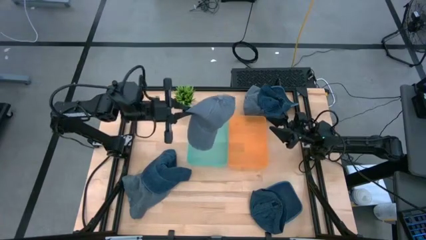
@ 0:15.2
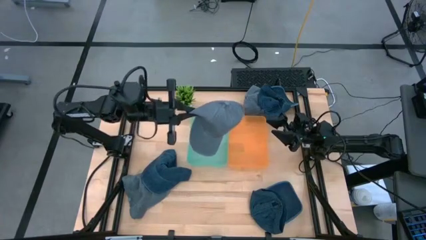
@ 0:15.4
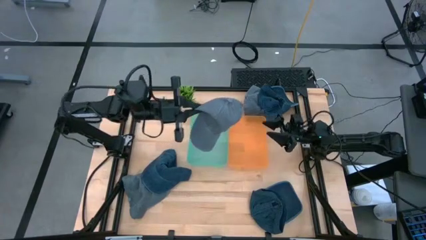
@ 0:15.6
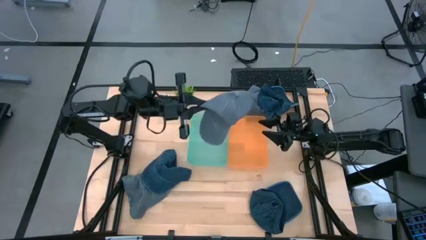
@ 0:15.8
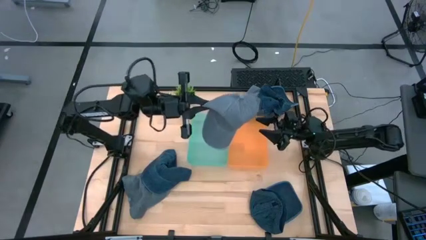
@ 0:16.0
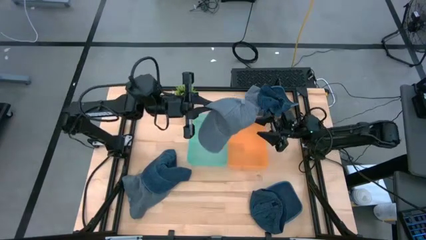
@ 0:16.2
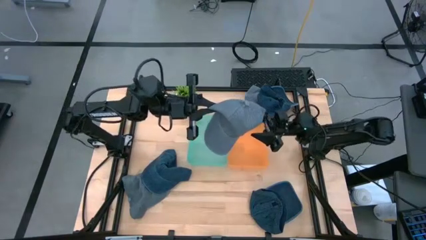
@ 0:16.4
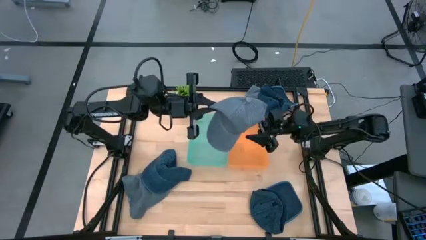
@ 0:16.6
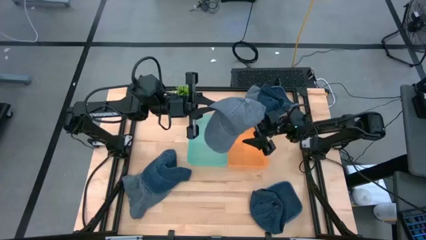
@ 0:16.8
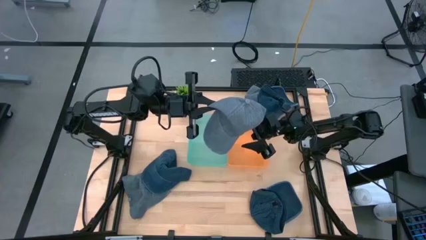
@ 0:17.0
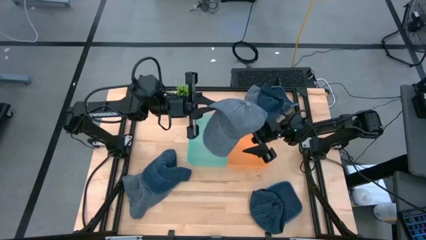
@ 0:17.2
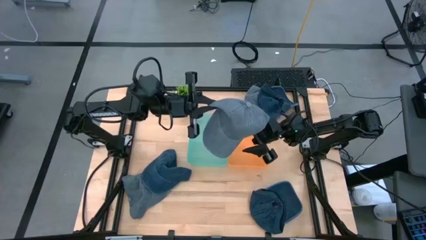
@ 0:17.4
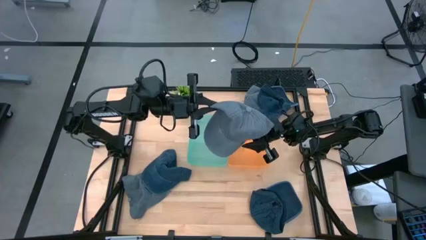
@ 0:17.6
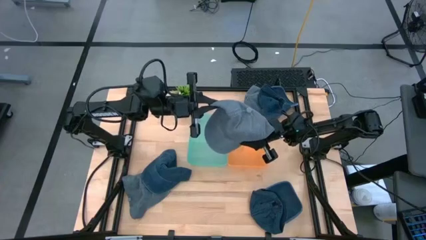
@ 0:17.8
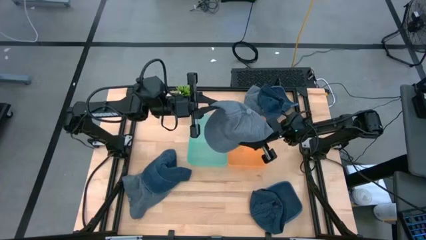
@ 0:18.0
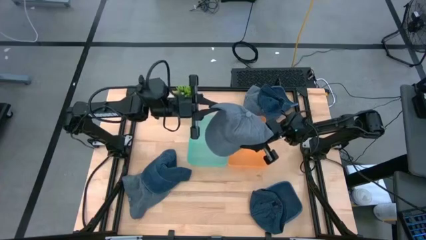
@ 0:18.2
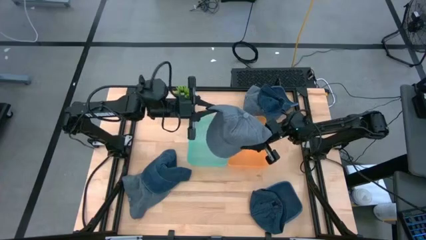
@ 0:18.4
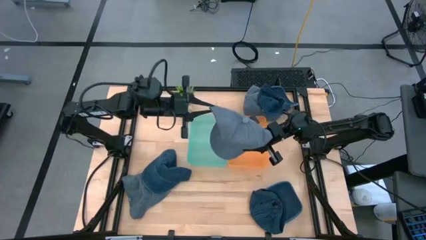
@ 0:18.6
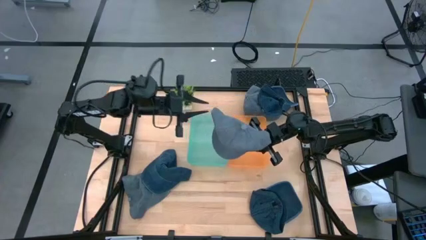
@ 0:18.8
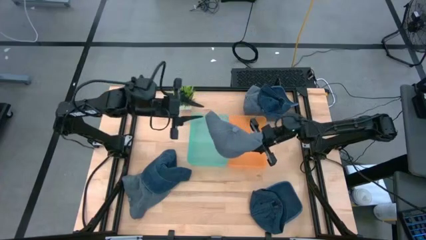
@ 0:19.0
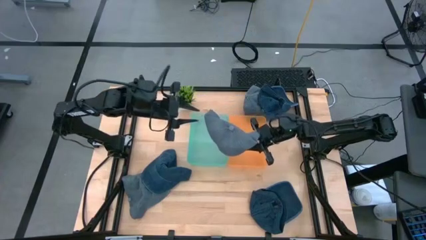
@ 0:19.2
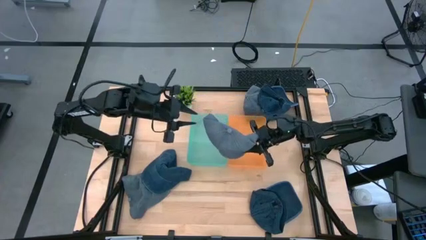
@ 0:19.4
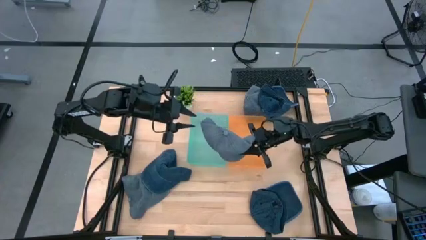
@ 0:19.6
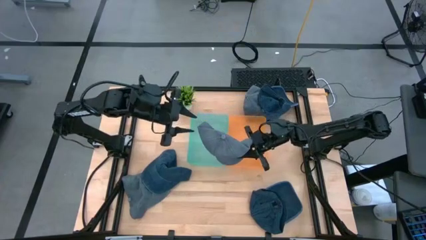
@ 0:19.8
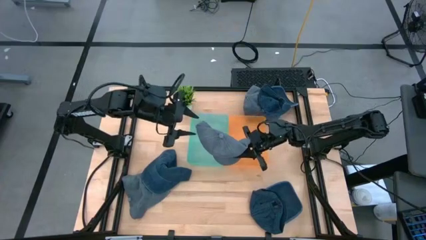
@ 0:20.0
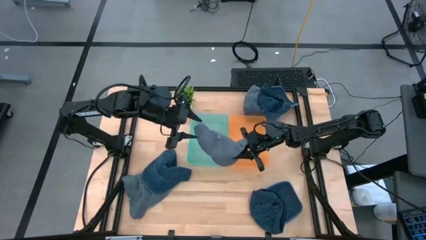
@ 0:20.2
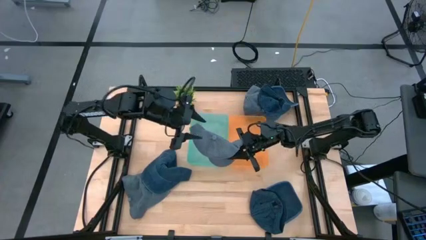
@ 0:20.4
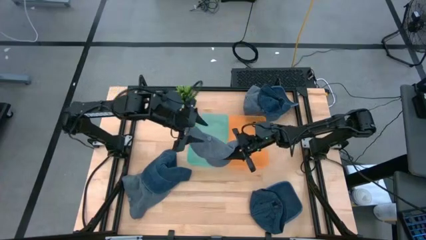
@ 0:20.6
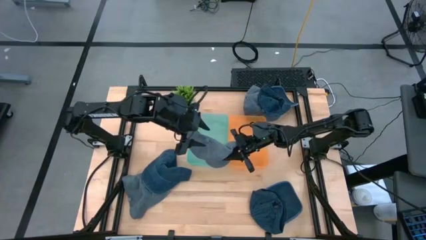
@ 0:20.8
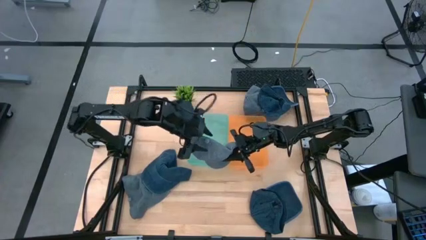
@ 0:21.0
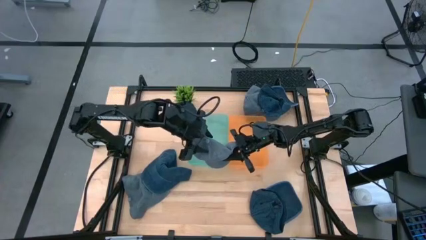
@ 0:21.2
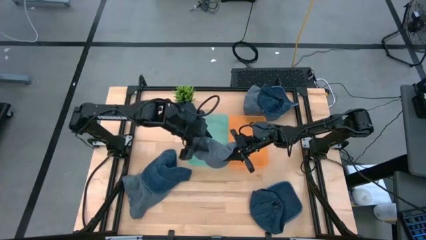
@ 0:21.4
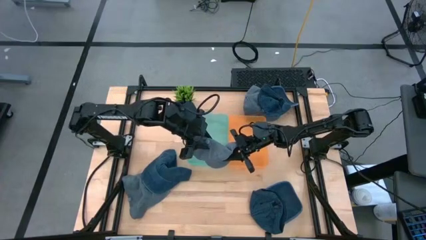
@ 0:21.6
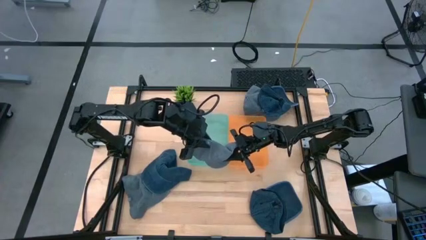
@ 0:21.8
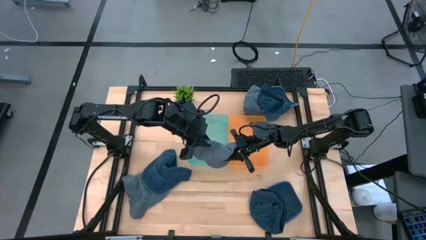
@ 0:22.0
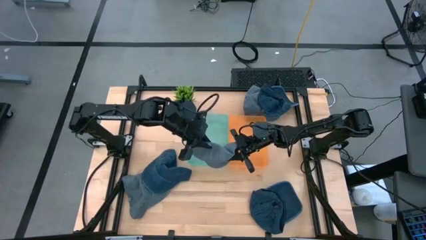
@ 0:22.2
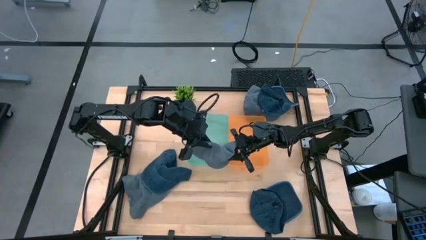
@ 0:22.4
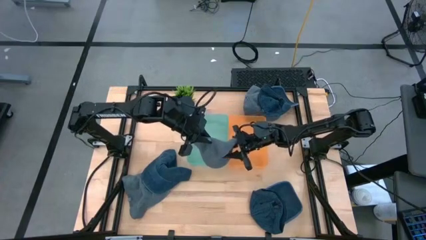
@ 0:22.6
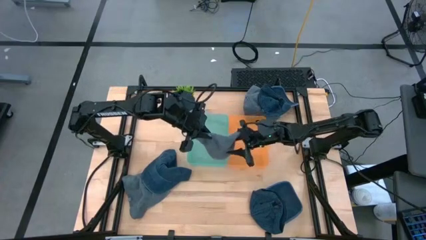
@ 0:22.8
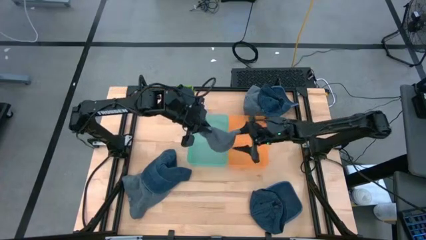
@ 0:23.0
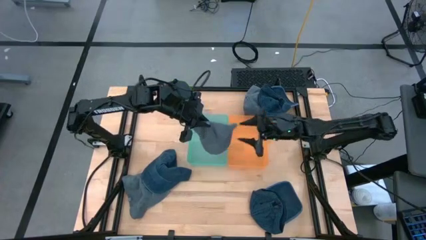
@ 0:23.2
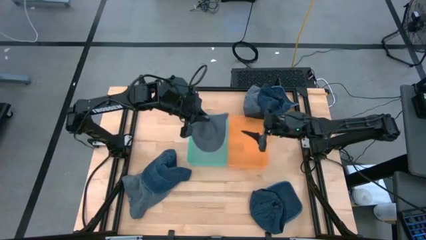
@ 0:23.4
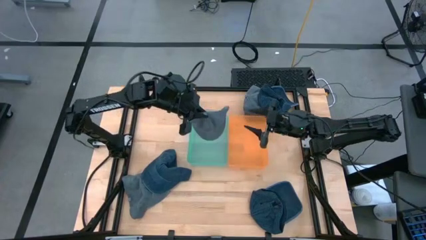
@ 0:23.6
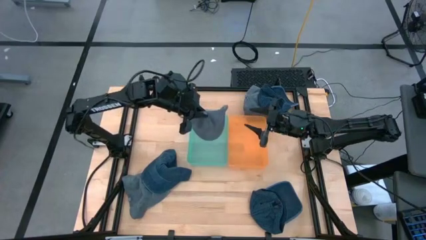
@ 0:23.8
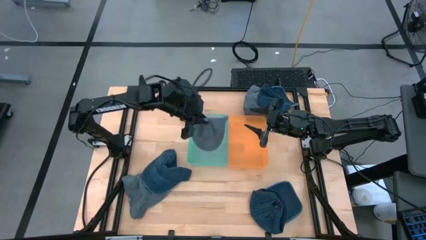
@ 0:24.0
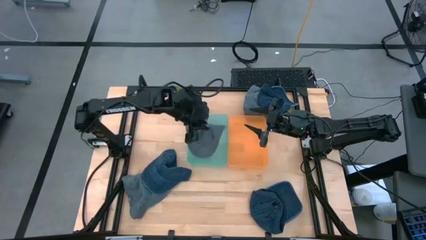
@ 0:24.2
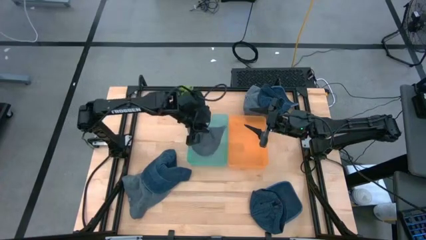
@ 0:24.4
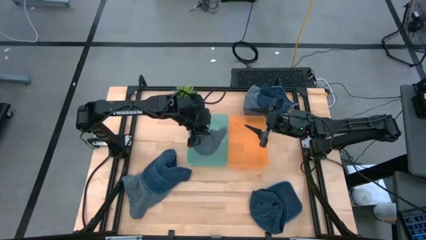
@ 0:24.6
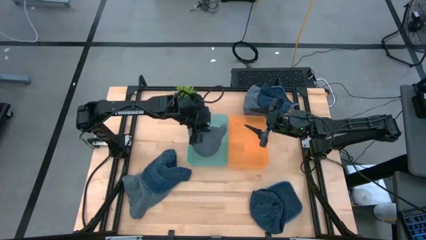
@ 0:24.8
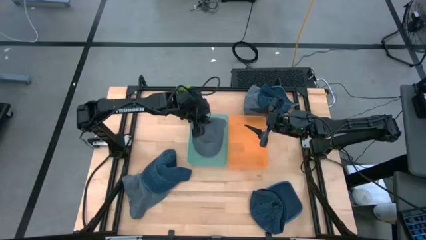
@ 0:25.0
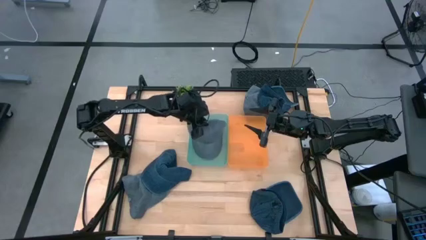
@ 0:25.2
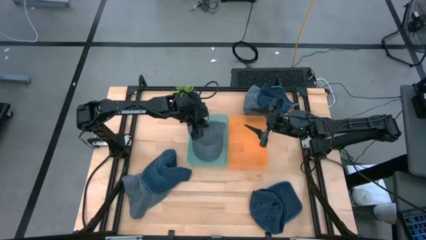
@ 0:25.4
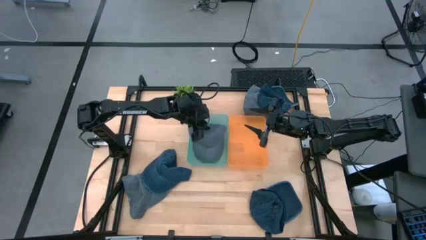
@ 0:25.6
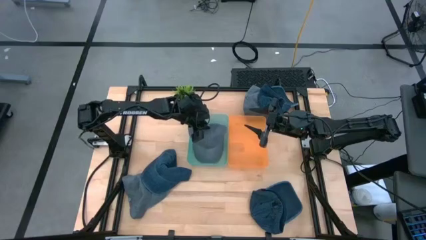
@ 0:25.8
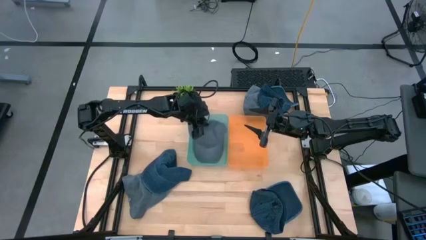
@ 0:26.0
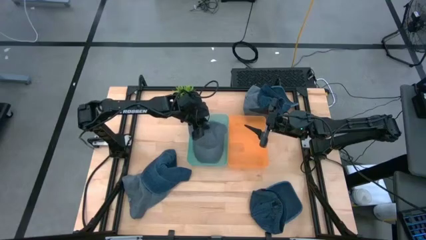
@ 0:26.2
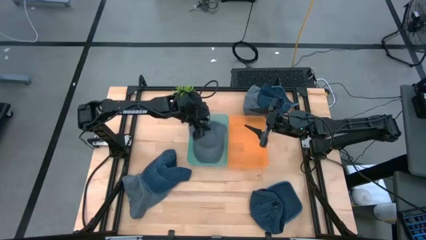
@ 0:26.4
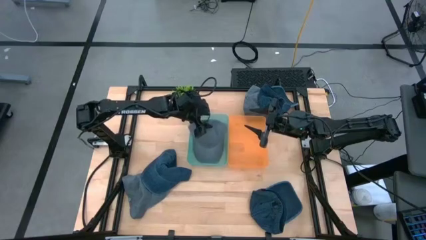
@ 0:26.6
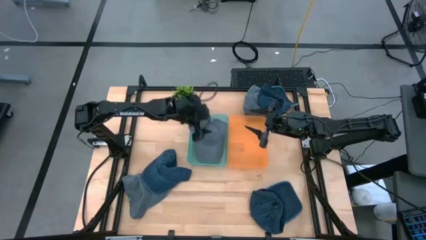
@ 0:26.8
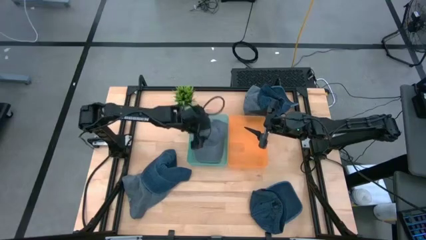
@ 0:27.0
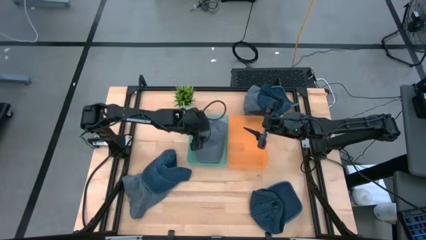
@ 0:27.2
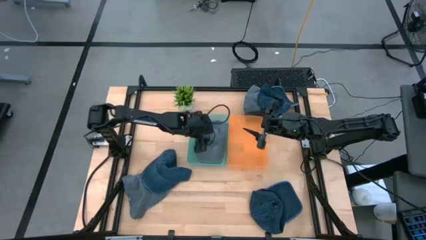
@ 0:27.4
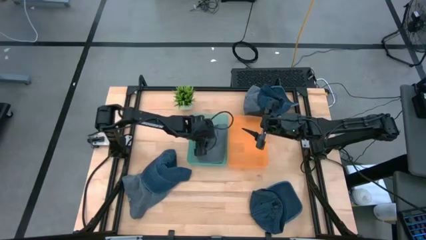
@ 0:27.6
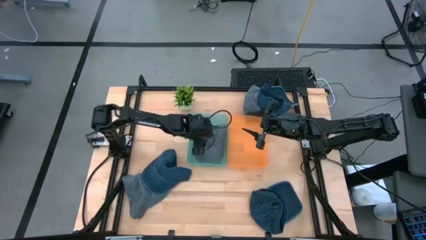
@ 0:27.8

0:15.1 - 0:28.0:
Task: Pick & Place hat
Put the middle left gray cap into the green bin
